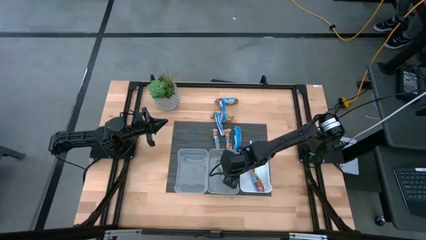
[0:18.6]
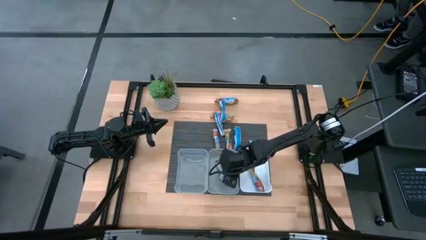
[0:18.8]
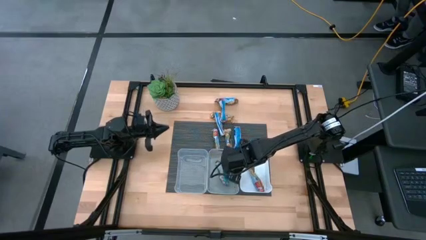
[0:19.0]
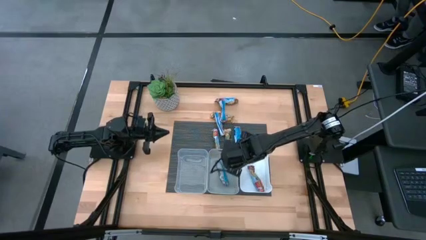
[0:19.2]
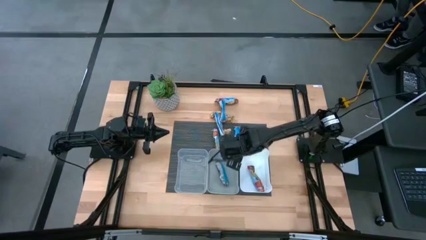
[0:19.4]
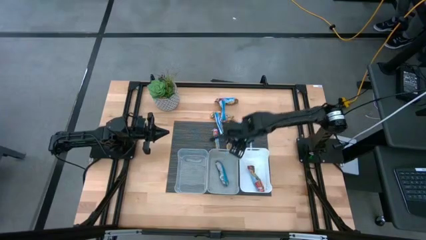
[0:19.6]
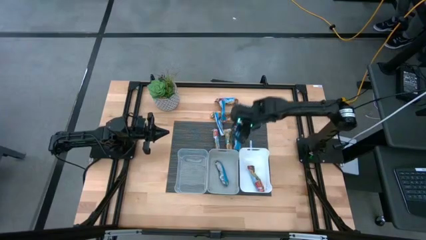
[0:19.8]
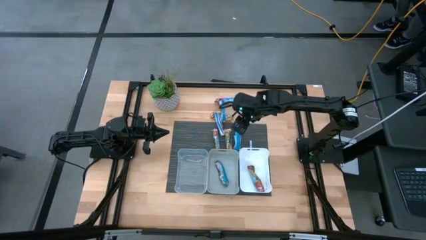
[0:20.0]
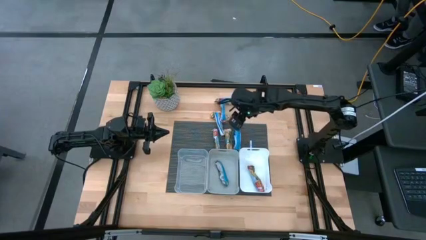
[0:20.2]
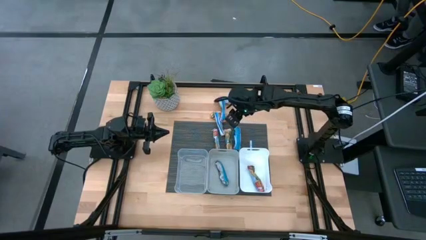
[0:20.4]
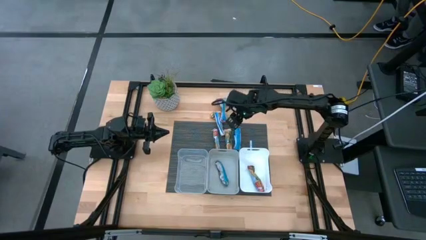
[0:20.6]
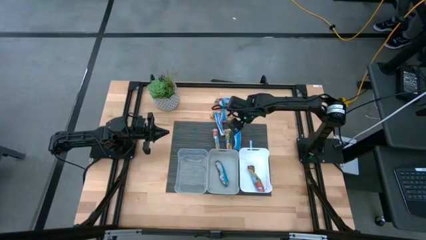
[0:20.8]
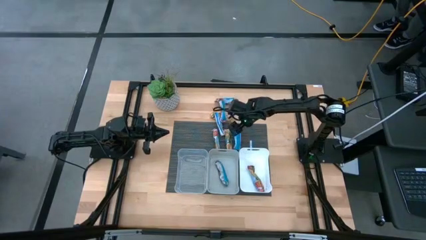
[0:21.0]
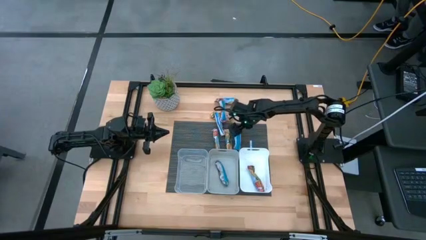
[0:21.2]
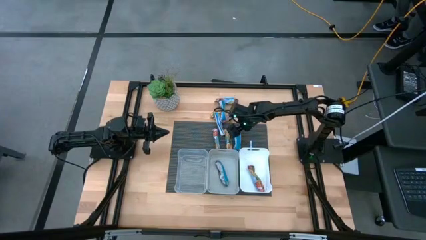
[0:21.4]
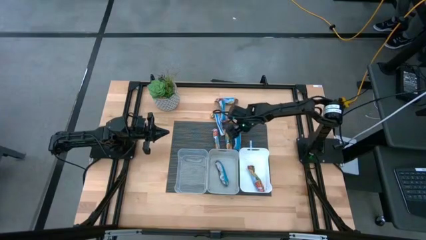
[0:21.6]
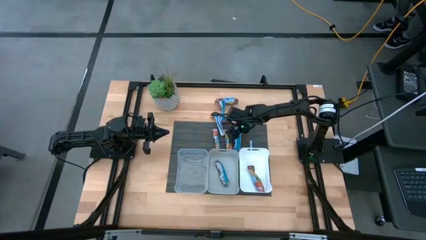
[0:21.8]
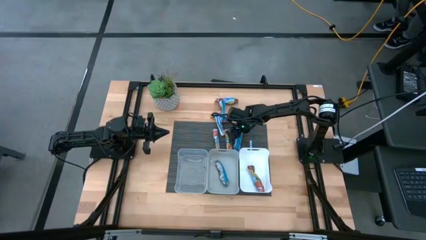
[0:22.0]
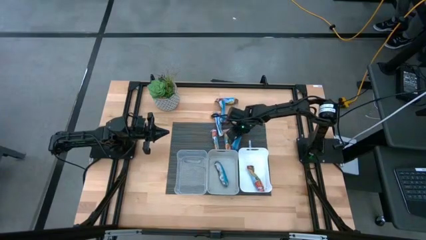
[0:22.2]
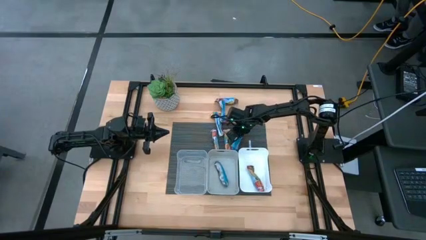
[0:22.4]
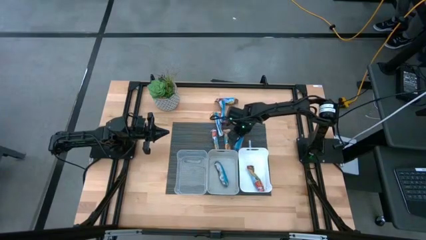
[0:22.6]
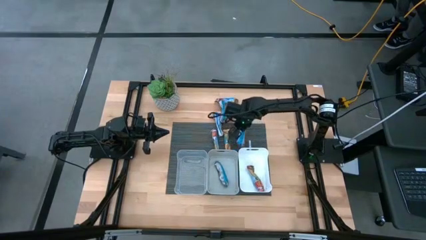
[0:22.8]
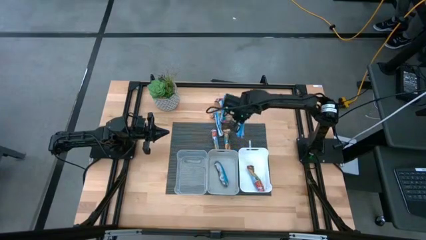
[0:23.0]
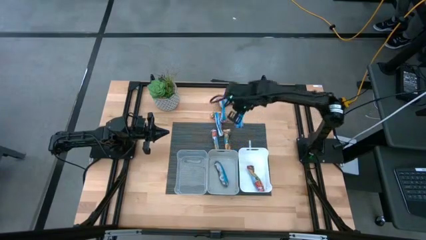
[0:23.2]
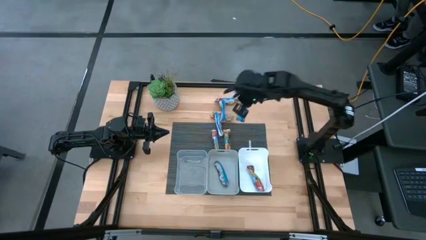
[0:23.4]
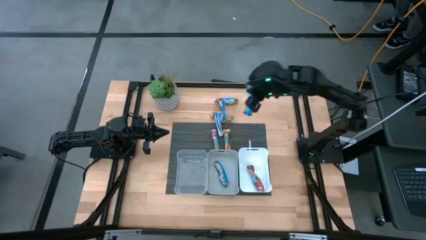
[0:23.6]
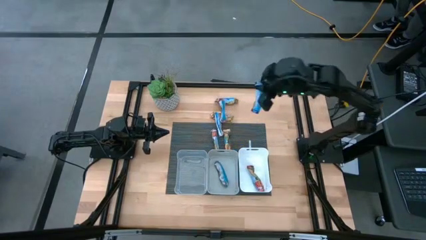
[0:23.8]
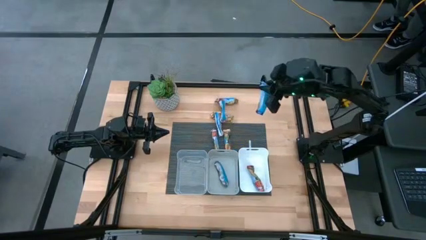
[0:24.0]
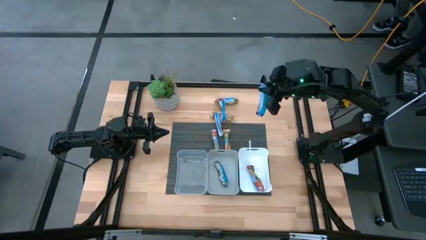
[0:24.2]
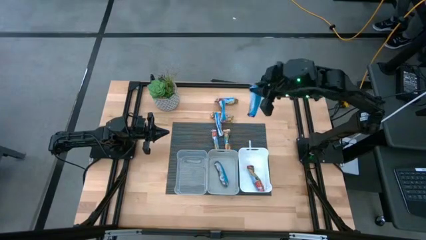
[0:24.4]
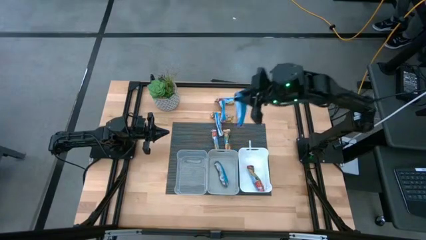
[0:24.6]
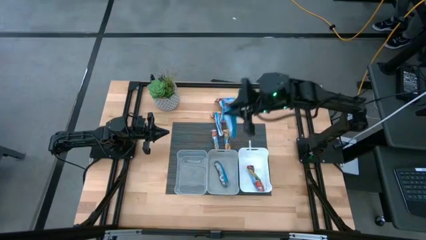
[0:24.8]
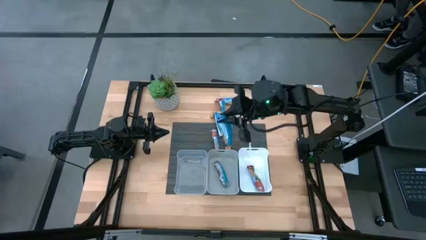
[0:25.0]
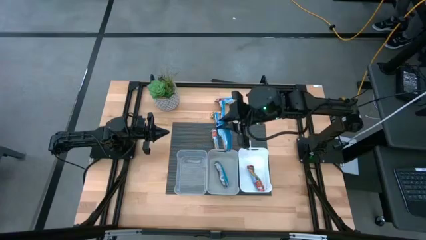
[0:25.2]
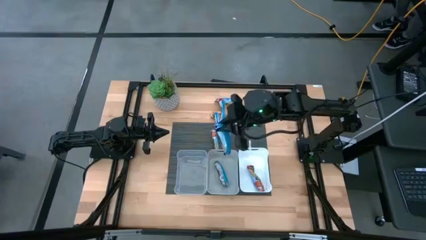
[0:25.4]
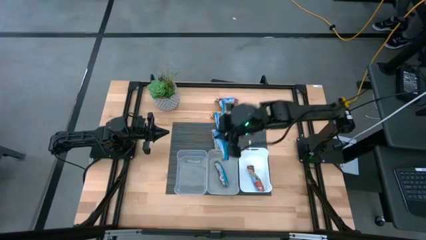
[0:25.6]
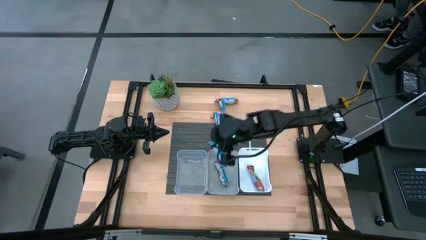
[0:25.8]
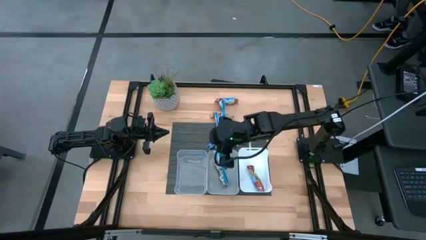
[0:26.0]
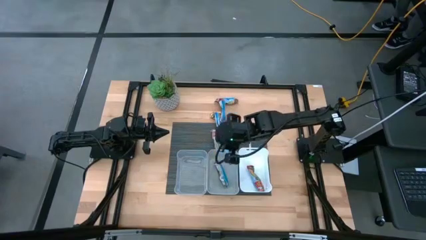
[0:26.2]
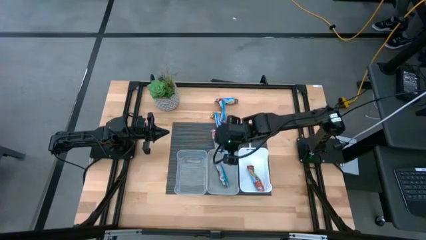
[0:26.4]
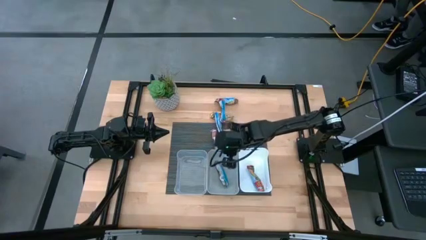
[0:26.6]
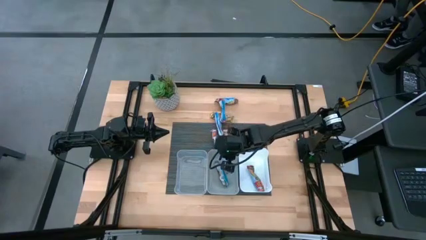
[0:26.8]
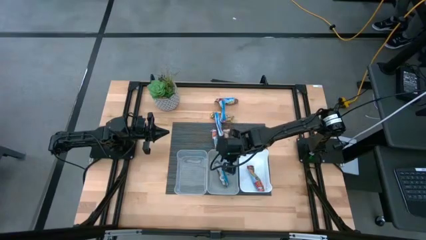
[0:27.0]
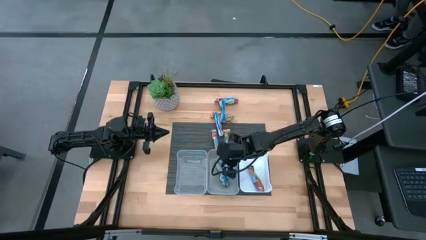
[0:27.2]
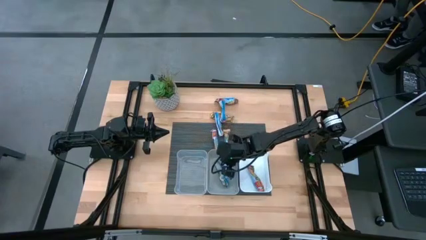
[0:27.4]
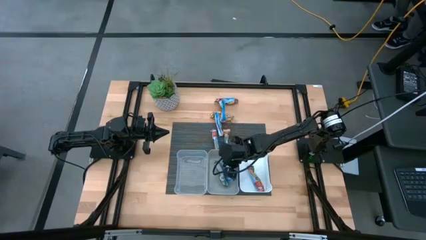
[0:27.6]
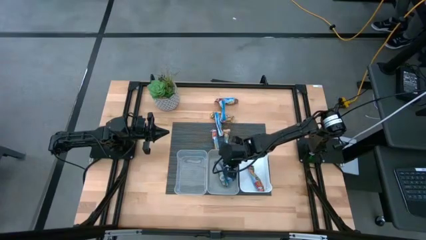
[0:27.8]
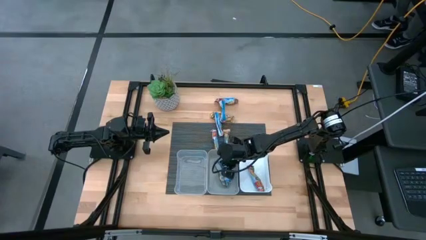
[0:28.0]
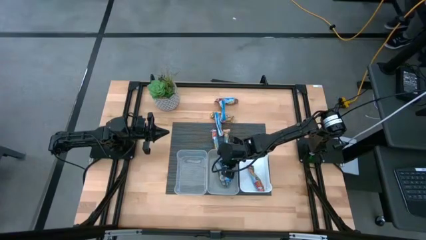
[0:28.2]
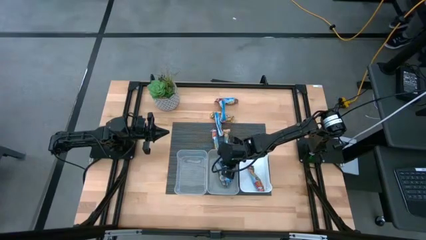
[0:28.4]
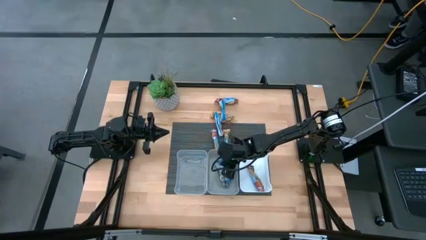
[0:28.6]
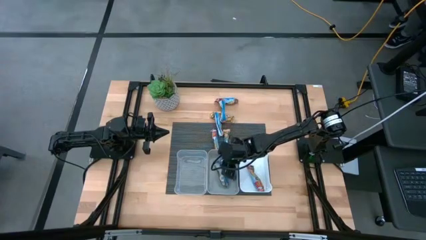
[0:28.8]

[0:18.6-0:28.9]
Task: Pick and place Granola Bars by type
Put the blue granola bar into the gray bin

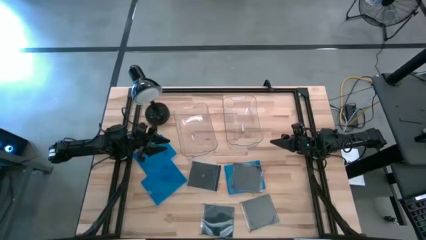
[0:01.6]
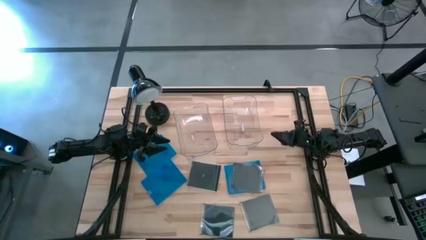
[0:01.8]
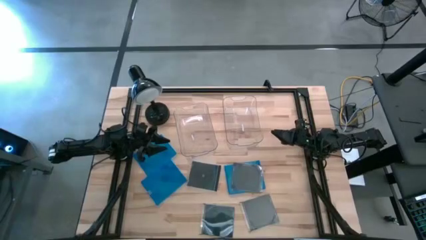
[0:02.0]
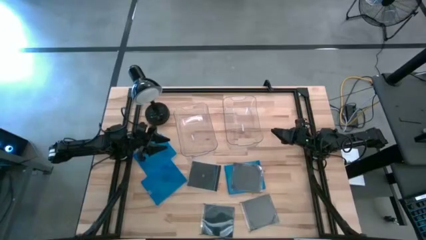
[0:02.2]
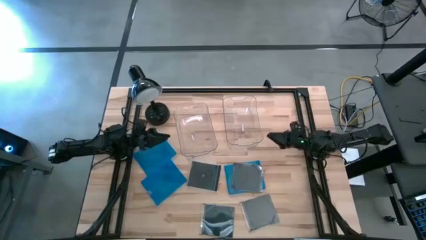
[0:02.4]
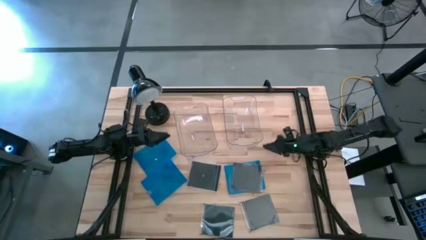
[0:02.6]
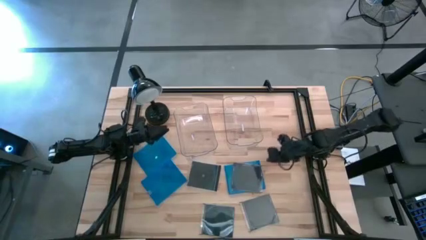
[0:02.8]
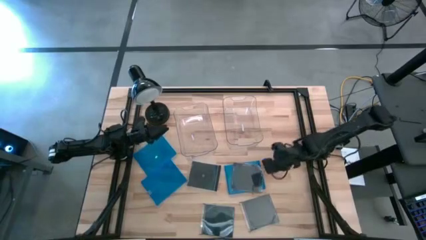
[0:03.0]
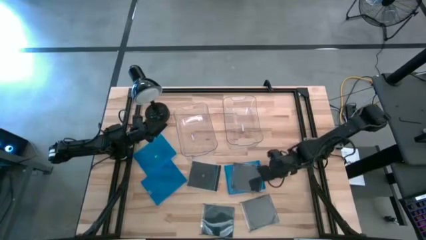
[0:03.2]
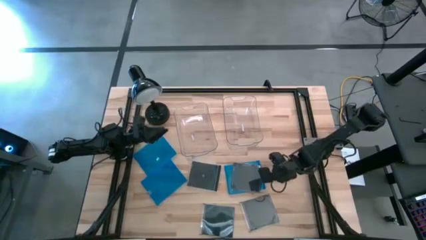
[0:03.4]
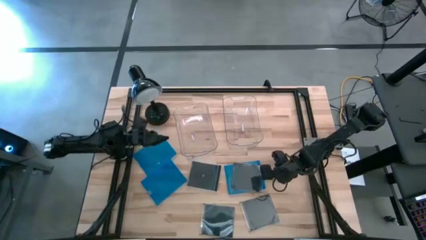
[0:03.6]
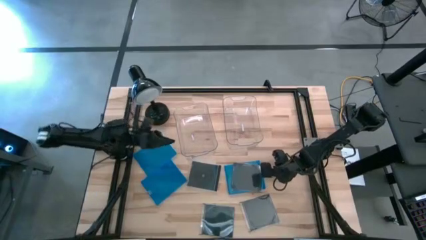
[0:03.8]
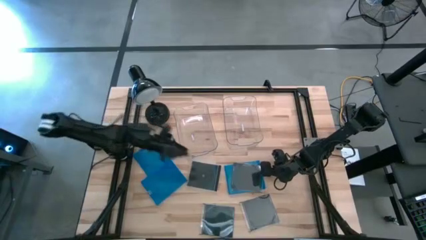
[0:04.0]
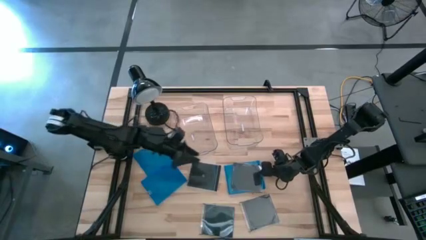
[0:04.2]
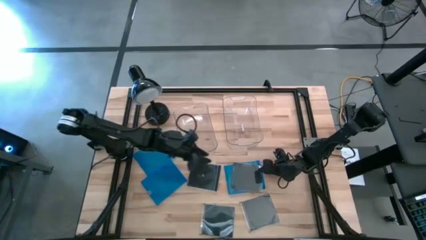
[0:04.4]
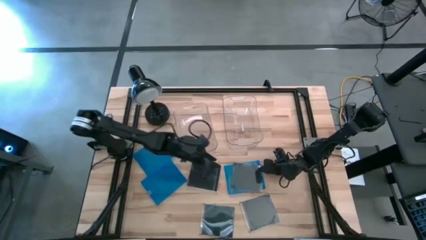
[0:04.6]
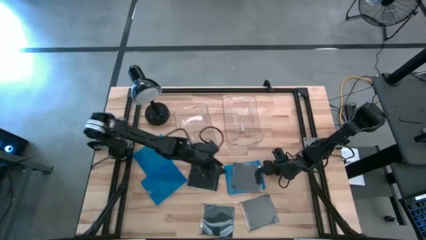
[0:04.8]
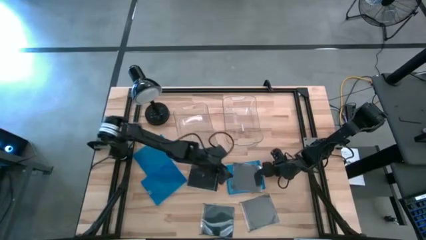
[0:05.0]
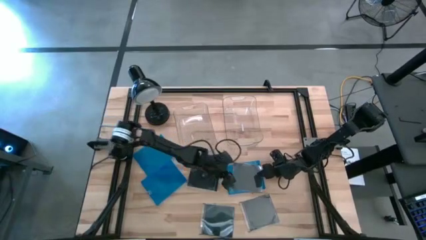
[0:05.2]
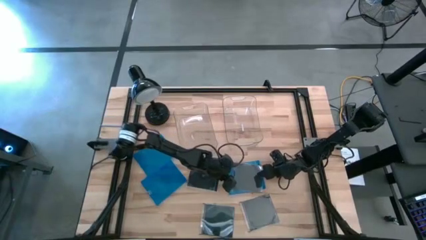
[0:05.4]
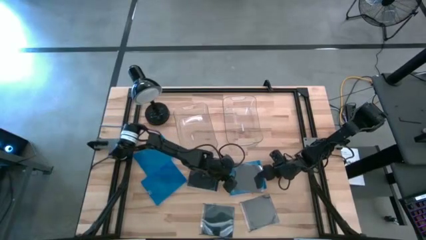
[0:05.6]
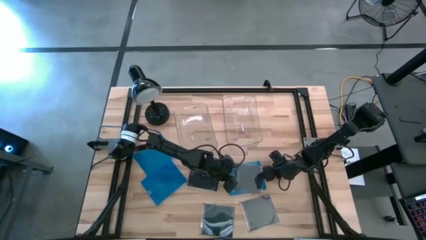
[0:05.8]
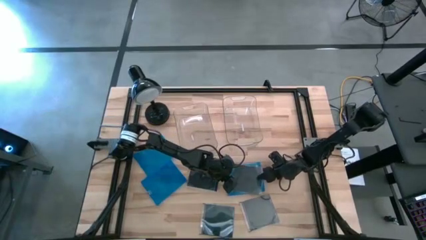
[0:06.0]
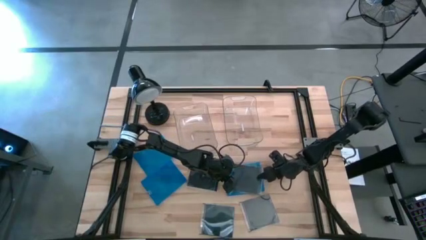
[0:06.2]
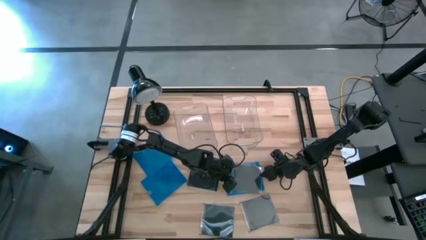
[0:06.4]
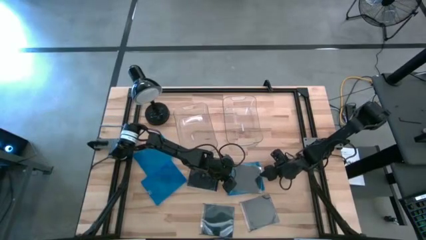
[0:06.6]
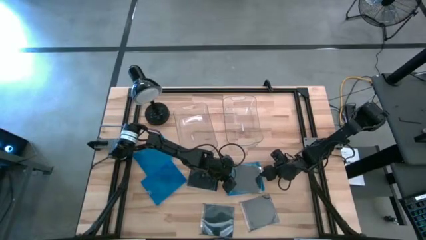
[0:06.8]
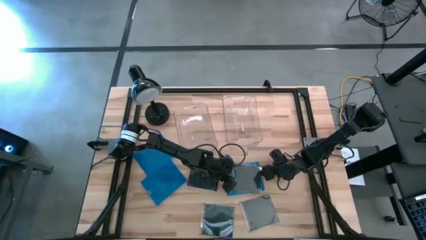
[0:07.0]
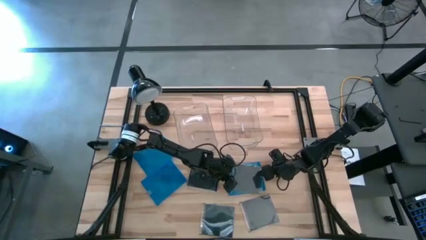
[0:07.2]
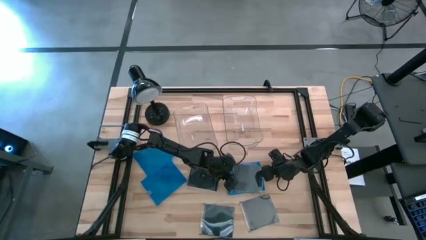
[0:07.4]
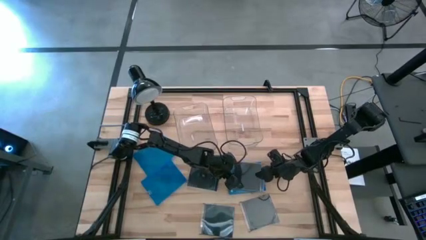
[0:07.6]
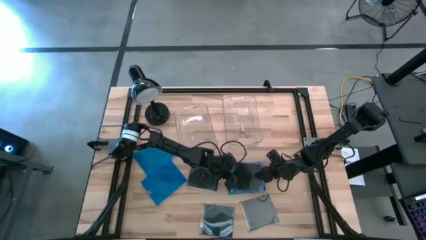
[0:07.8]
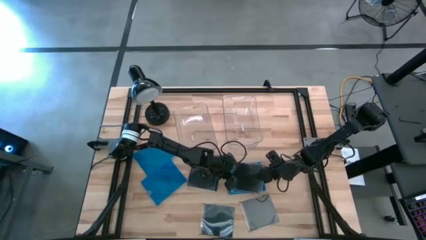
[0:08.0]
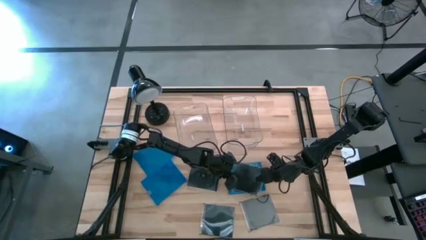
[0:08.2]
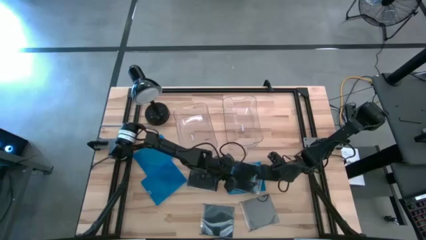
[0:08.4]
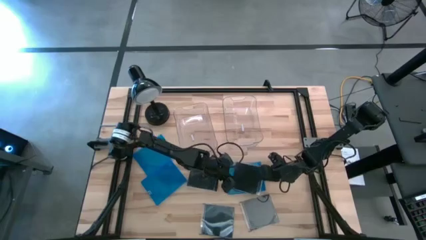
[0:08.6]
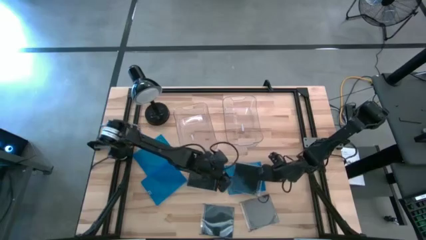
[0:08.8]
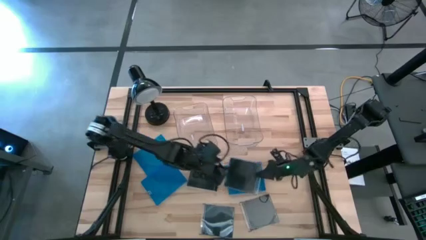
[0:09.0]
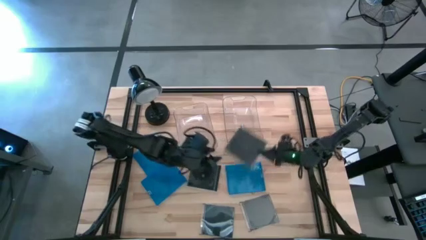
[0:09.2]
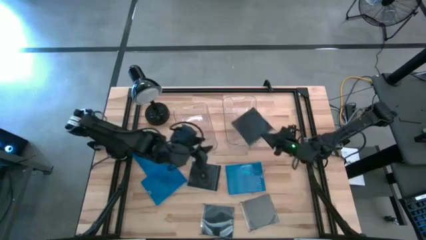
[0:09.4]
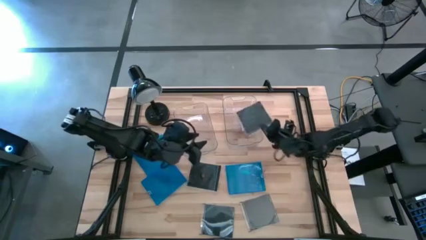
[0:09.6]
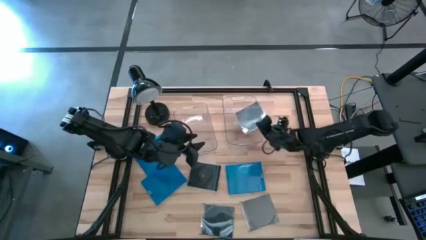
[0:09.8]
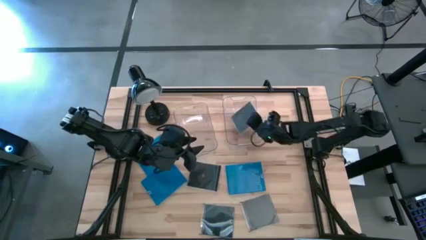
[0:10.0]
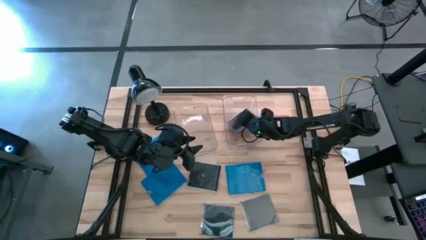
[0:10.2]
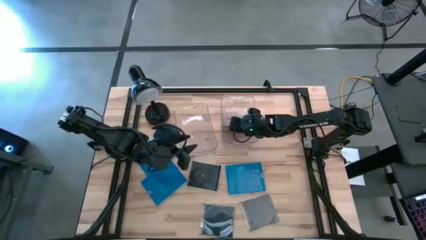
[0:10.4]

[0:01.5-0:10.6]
Task: Pick & place jewel cases by type
Put the top right black CD case into the right transparent bin
